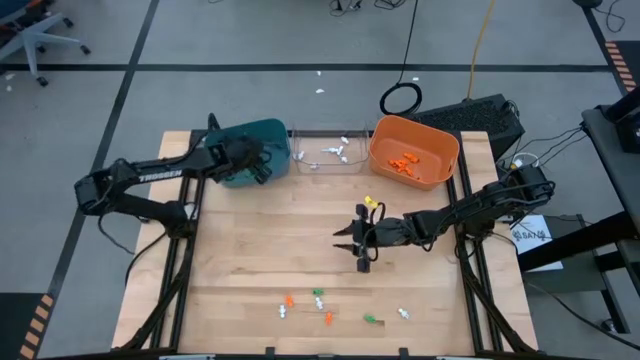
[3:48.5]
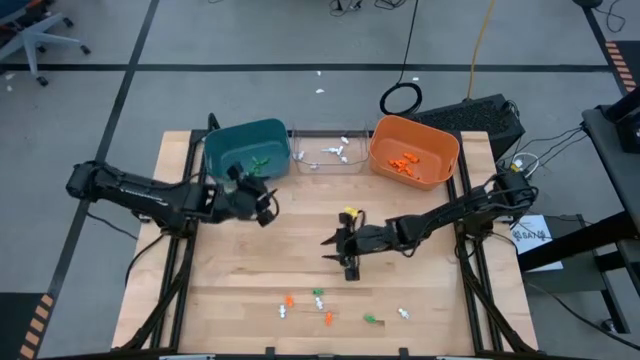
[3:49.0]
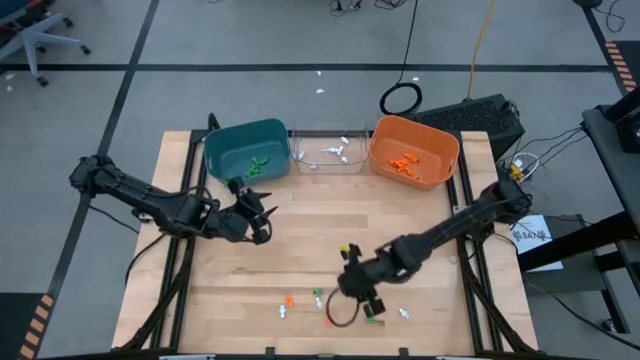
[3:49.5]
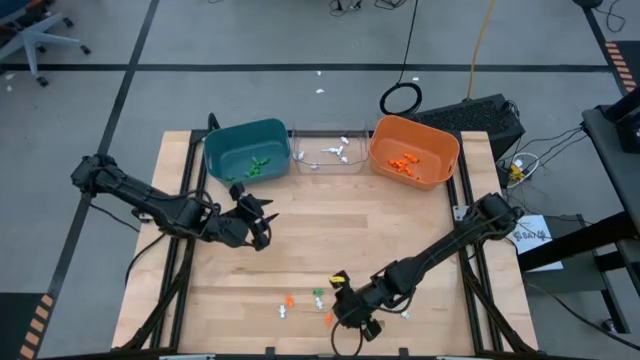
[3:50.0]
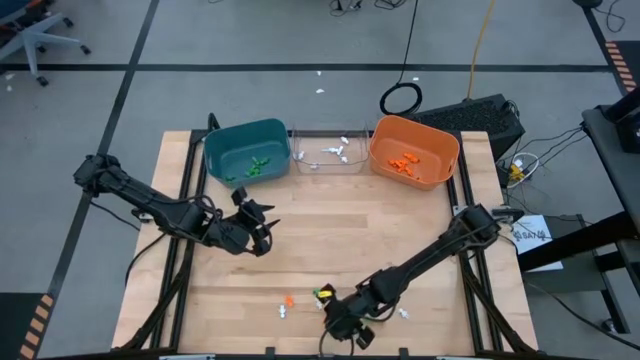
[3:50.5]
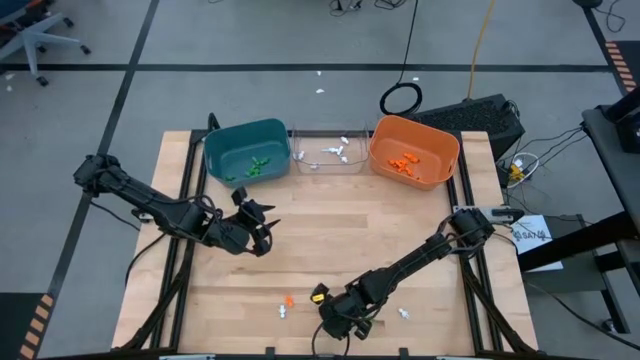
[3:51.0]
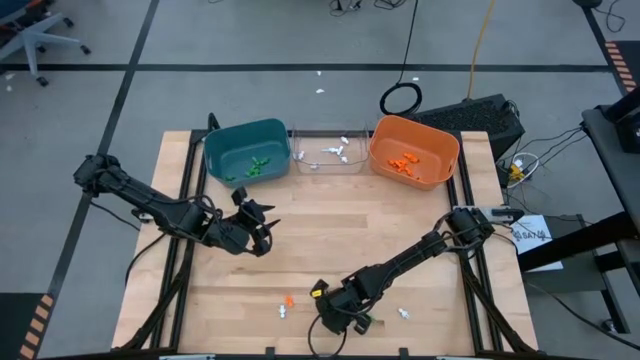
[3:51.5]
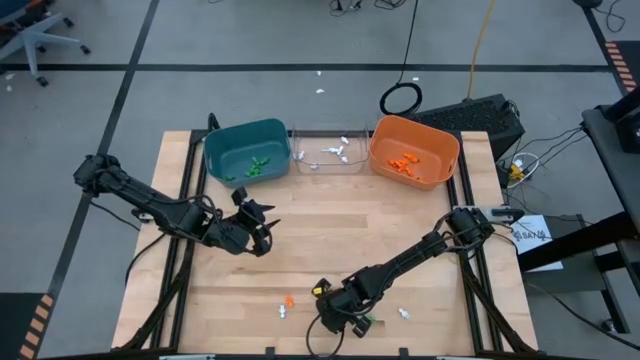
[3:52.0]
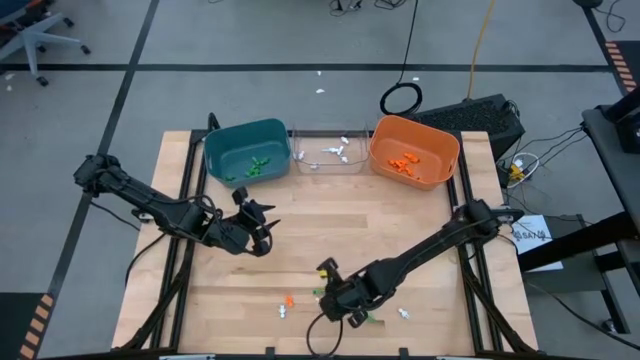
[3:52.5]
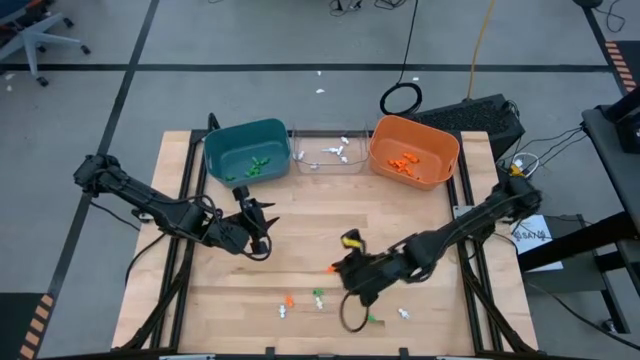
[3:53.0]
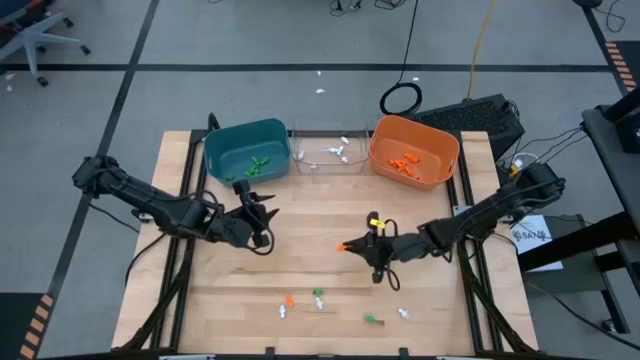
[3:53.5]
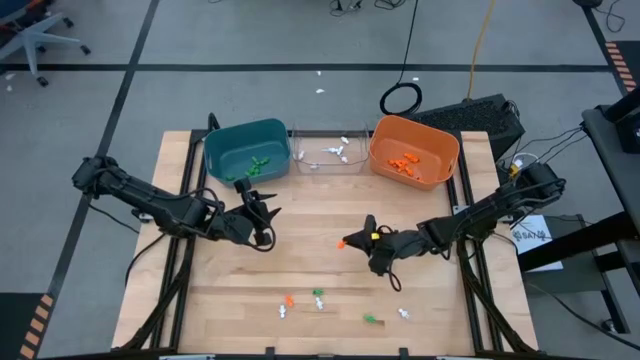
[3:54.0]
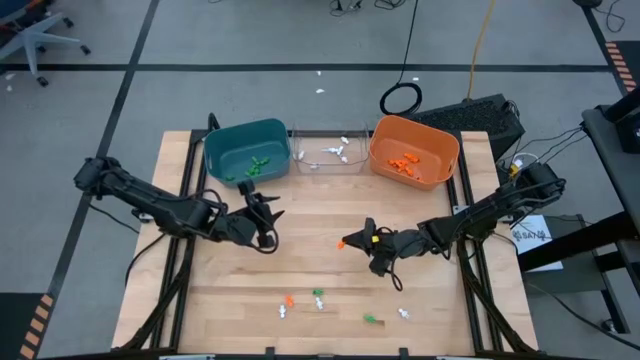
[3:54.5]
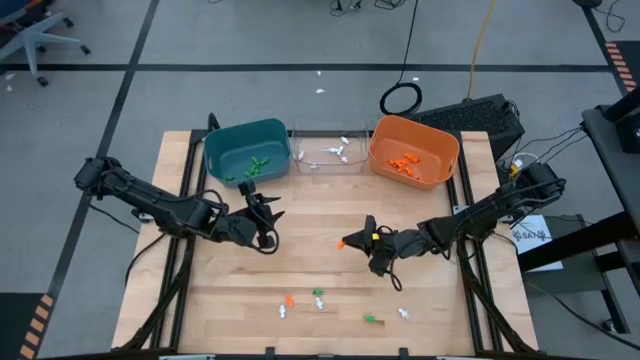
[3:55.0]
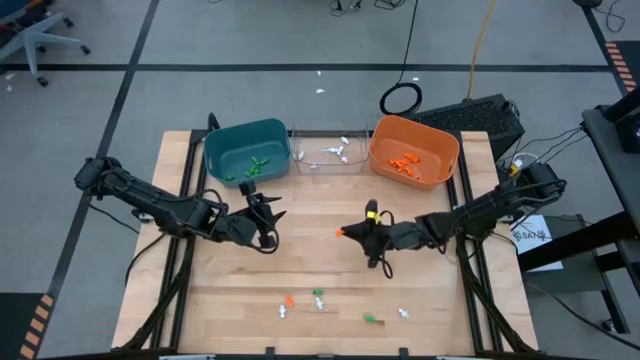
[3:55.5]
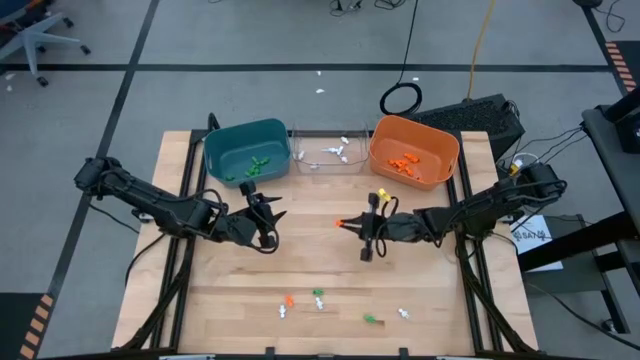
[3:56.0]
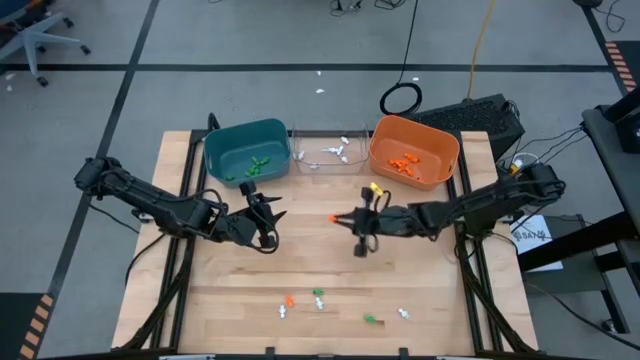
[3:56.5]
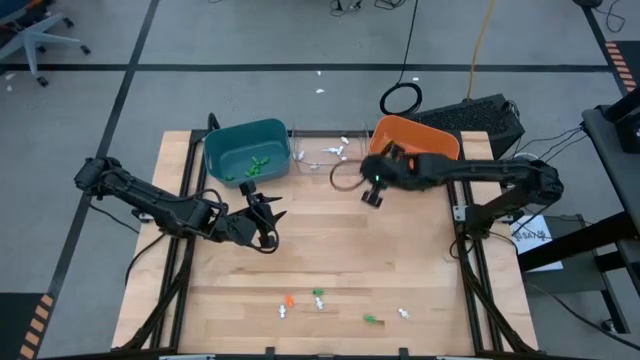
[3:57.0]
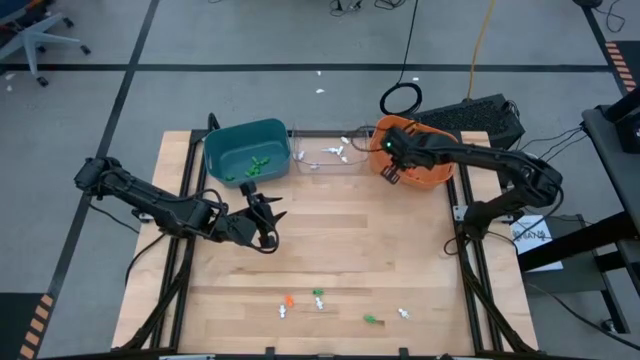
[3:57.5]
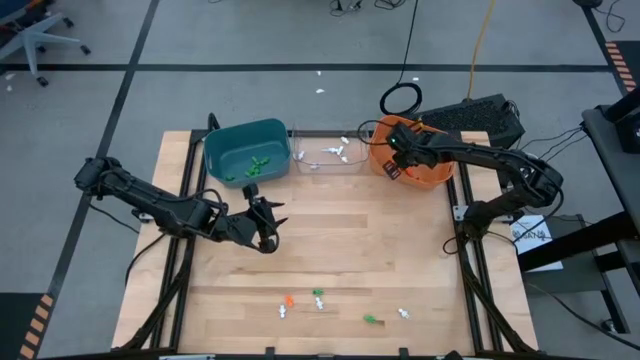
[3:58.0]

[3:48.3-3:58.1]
Task: Sort Halloween decoration
Put the orange skeleton toy into the orange bin

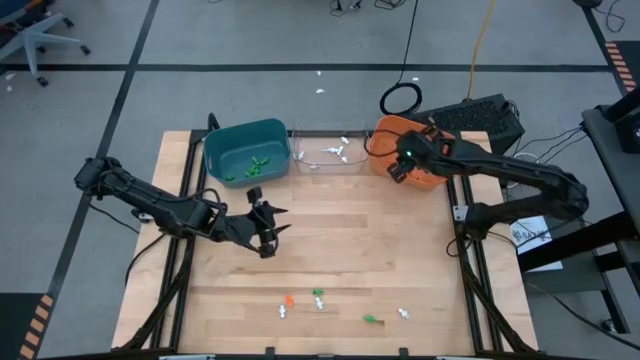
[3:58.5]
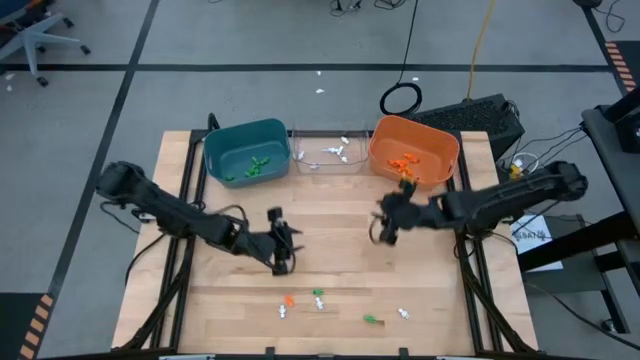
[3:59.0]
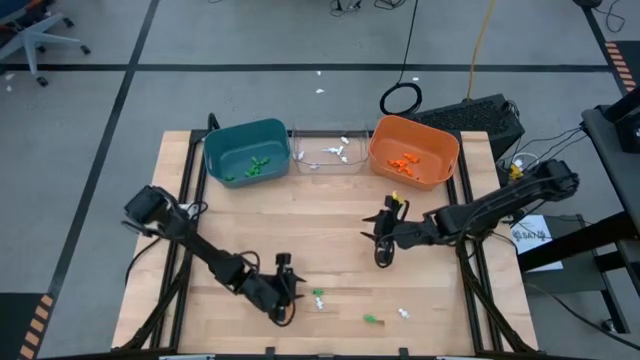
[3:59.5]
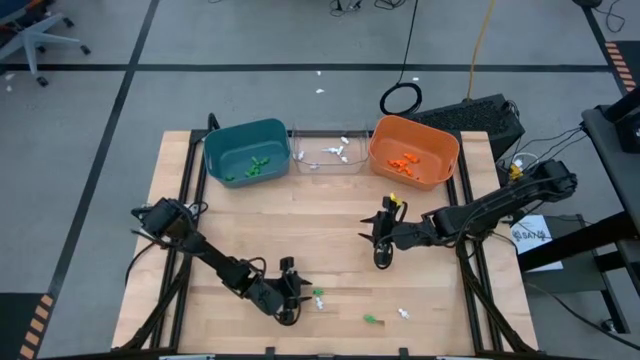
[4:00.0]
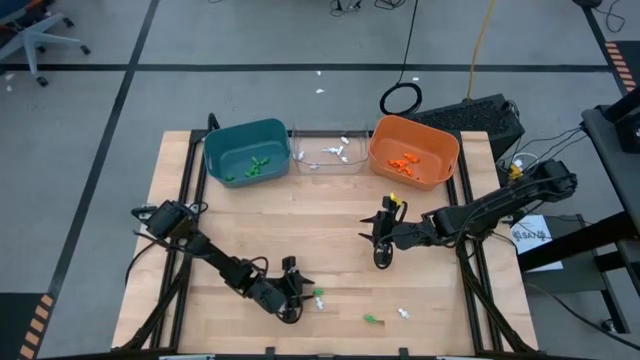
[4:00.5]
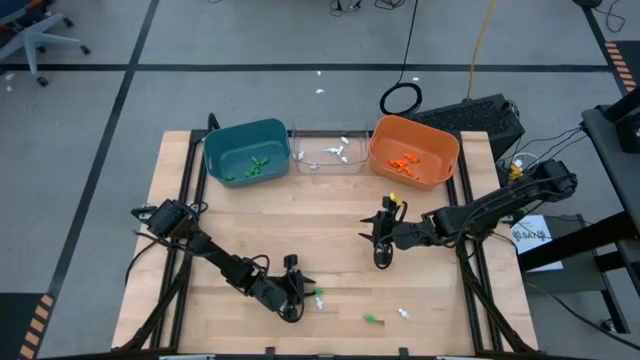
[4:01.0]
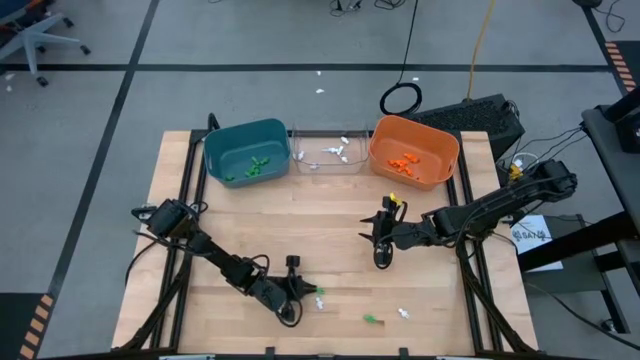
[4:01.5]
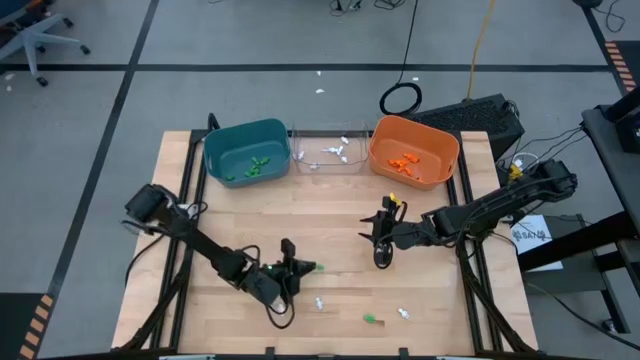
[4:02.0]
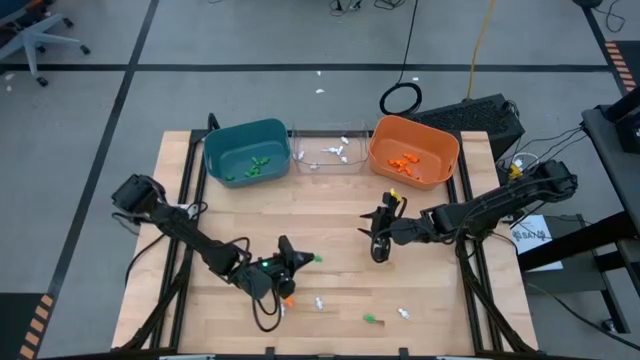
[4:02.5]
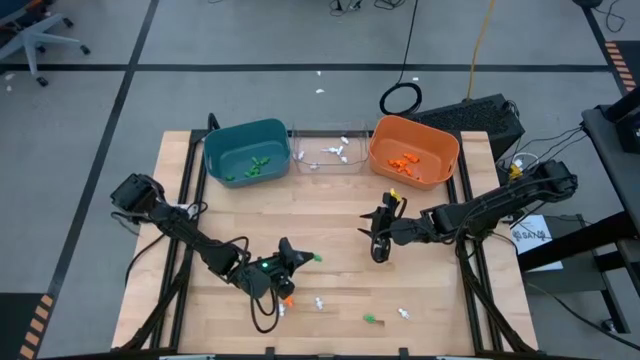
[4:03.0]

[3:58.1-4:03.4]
Put the green skeleton toy into the blue bin

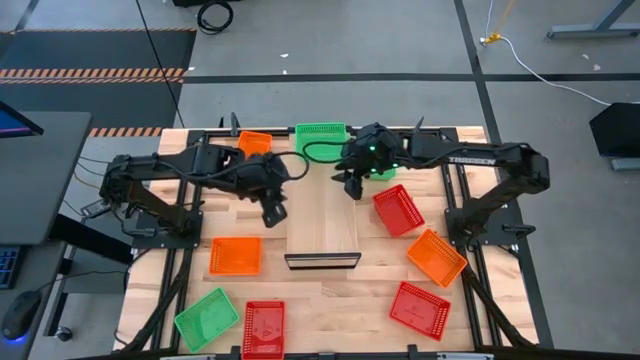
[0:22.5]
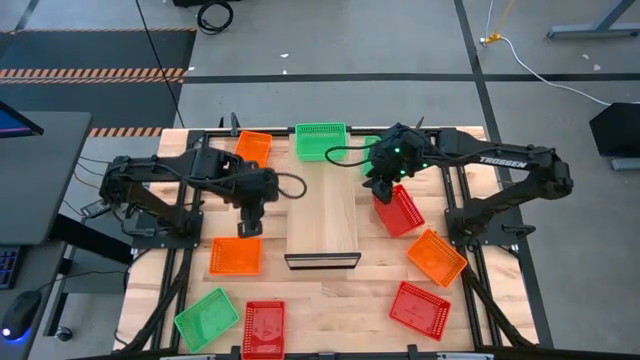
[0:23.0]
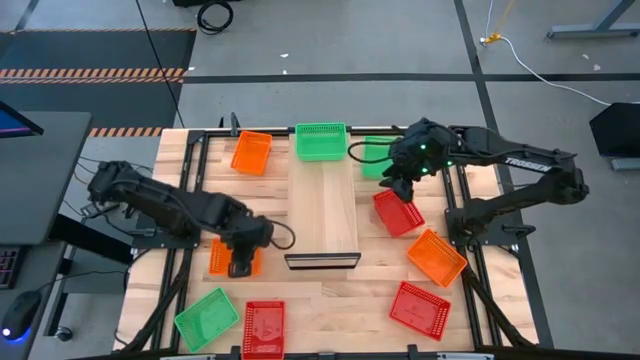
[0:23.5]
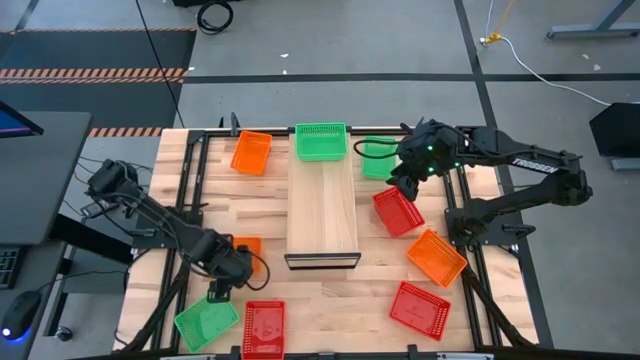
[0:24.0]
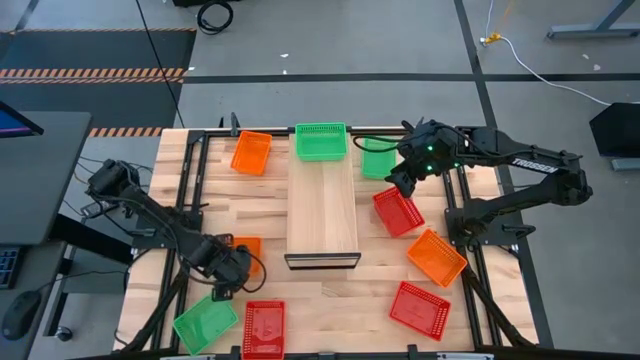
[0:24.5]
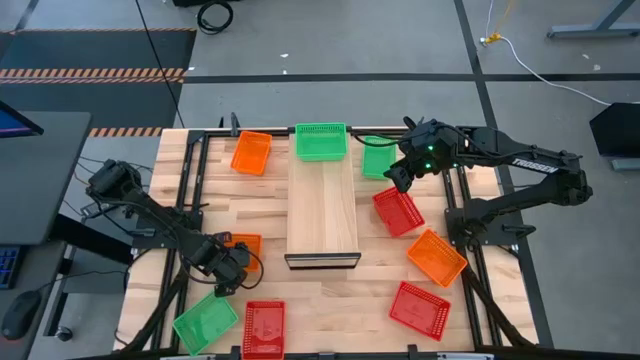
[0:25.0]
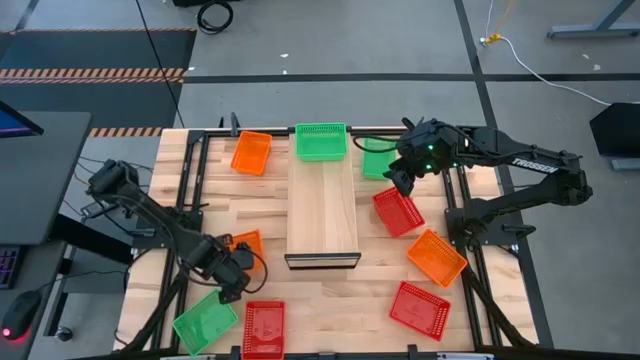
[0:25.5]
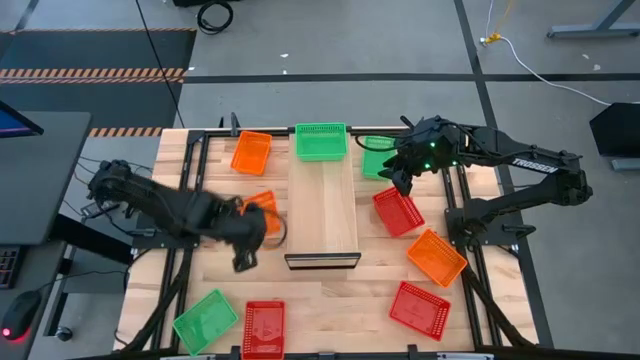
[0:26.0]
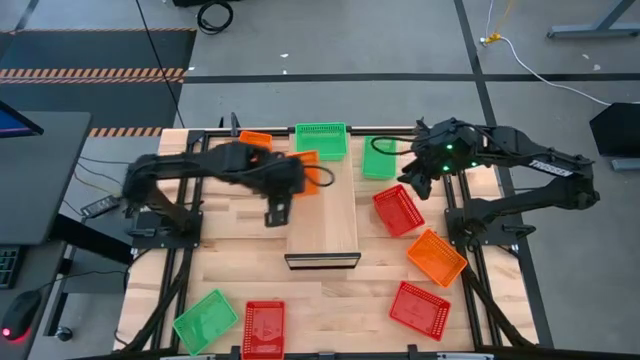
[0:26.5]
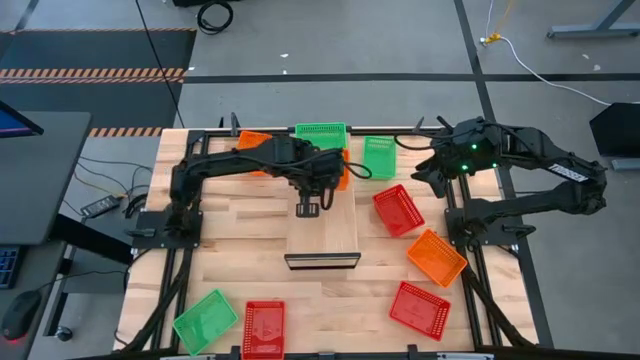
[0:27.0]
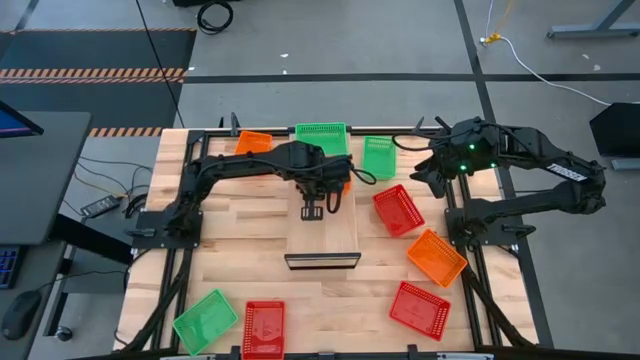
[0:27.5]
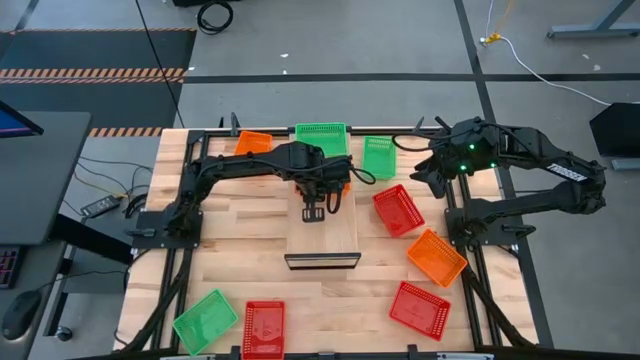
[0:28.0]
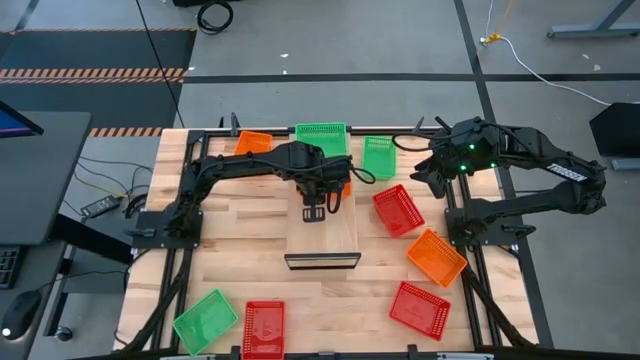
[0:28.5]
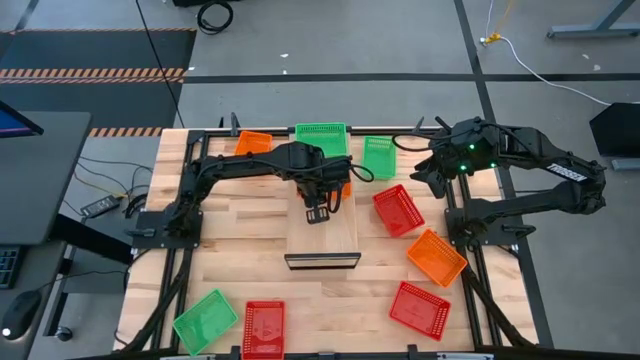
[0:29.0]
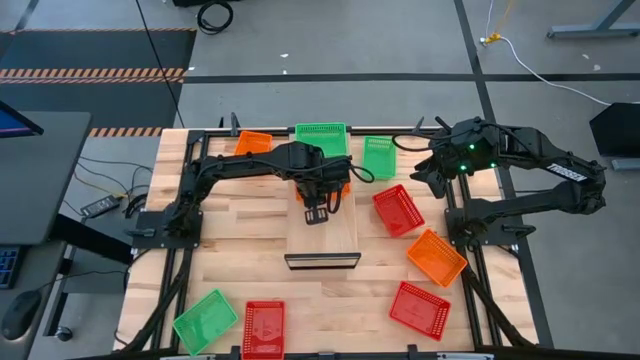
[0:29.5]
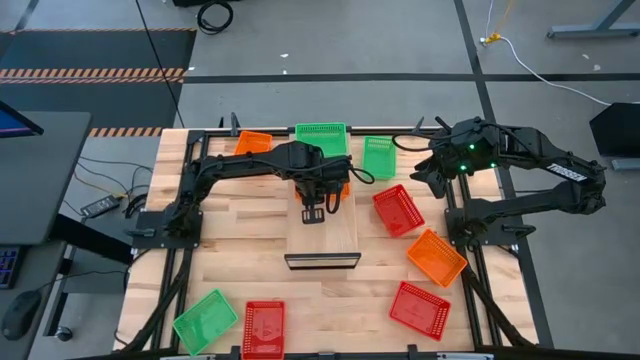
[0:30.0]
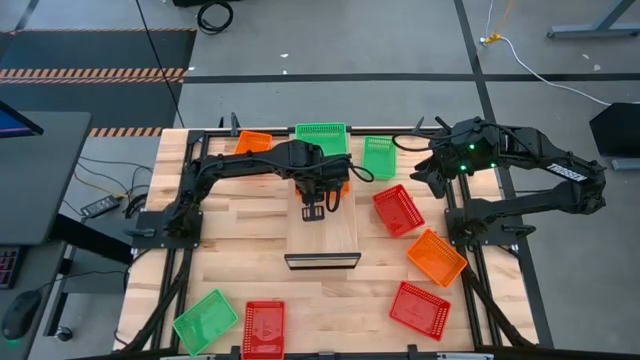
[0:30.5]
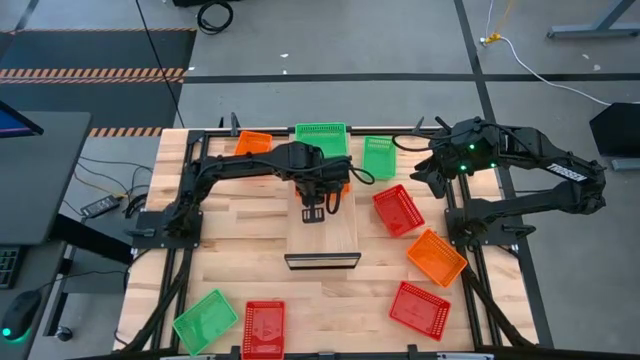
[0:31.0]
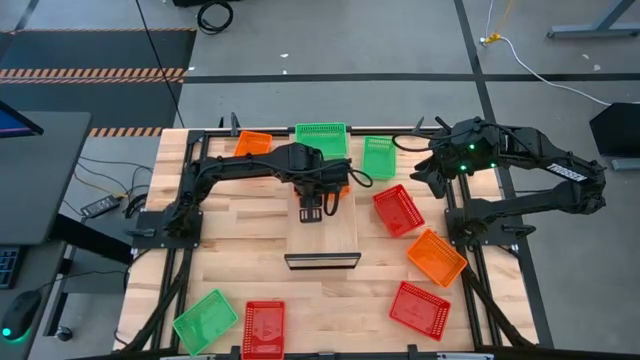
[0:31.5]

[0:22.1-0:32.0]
Task: Stack baskets on shelf by color
Put the bottom left orange bin on the shelf
